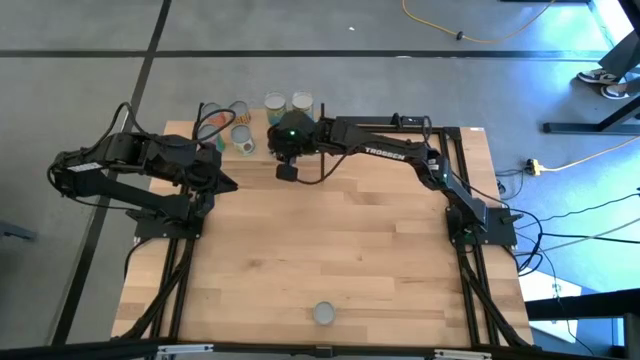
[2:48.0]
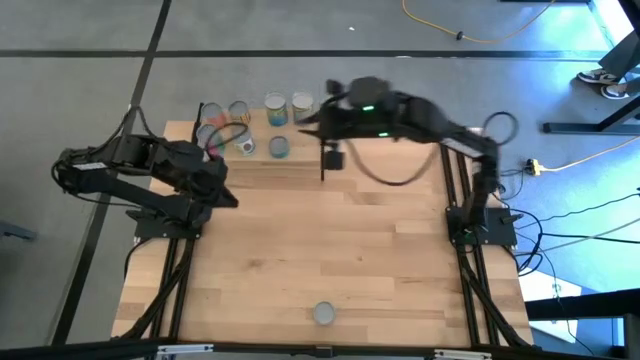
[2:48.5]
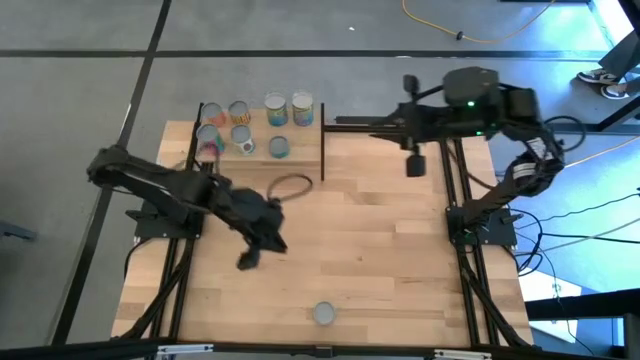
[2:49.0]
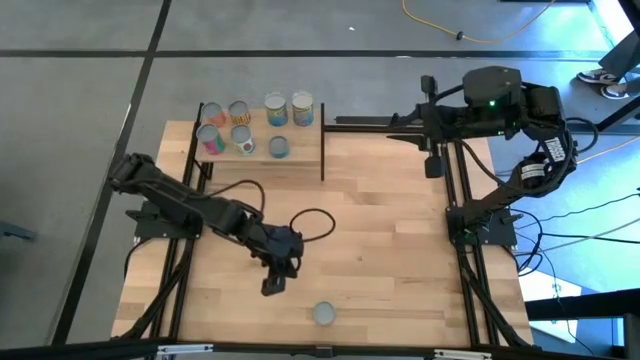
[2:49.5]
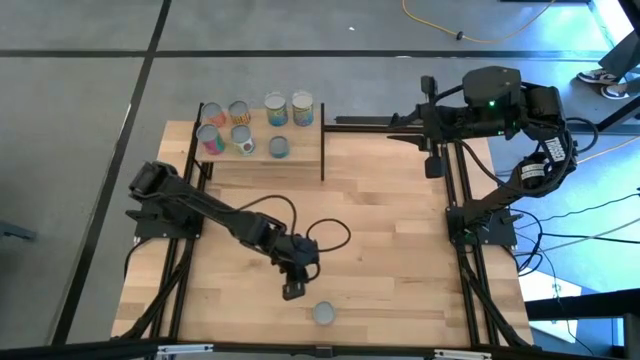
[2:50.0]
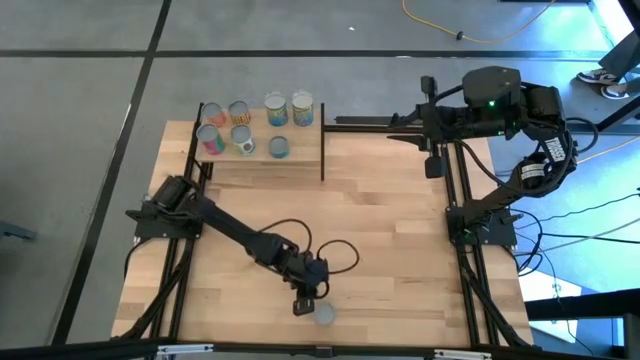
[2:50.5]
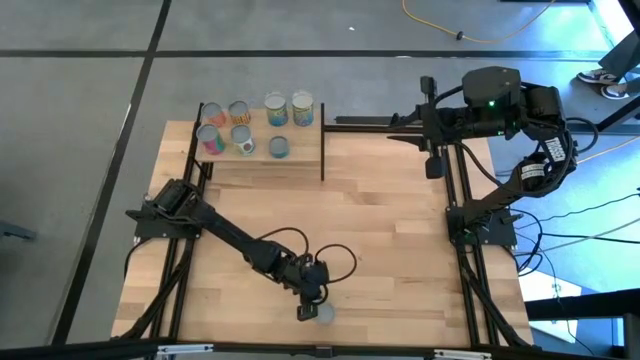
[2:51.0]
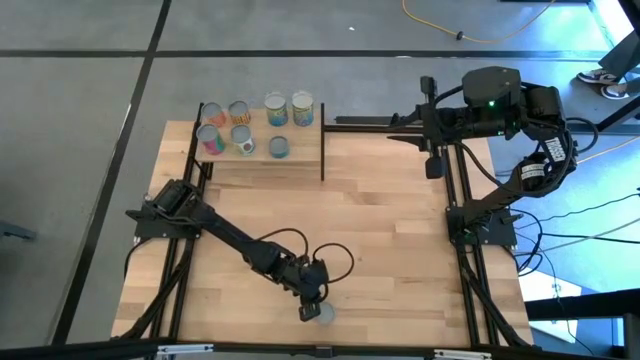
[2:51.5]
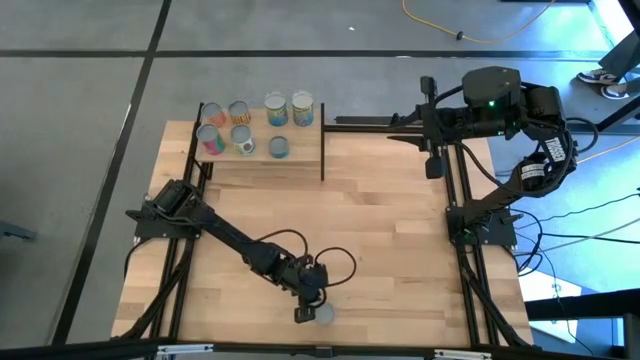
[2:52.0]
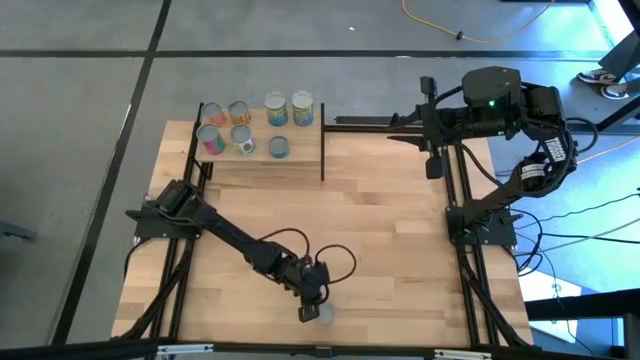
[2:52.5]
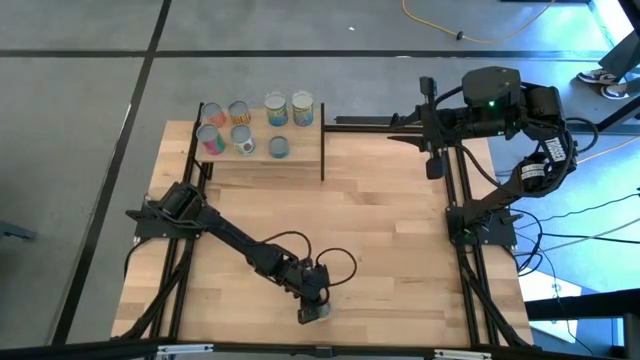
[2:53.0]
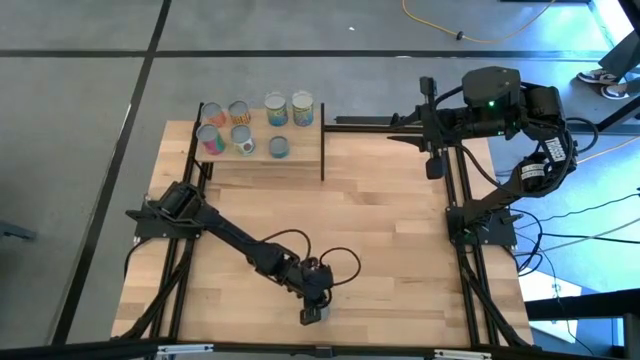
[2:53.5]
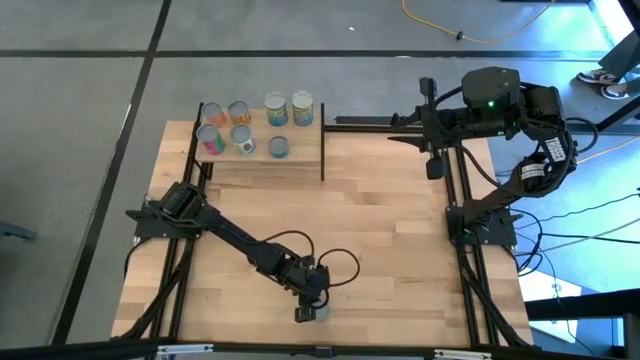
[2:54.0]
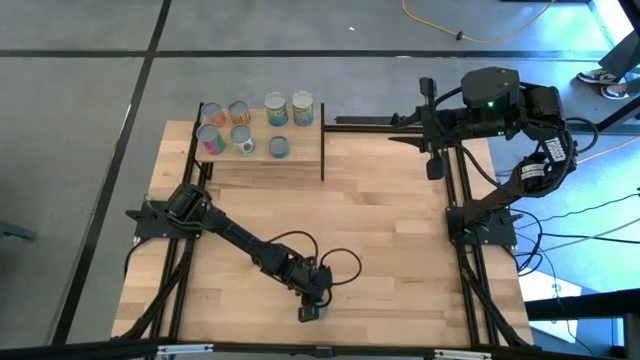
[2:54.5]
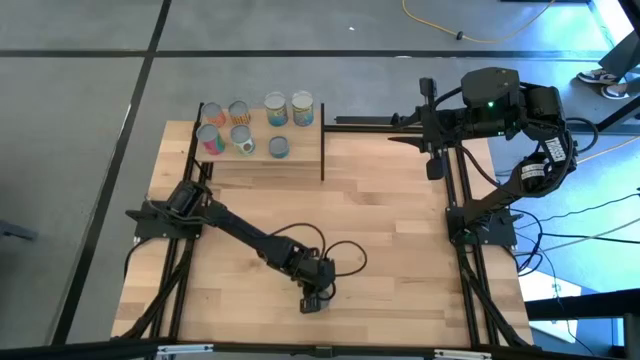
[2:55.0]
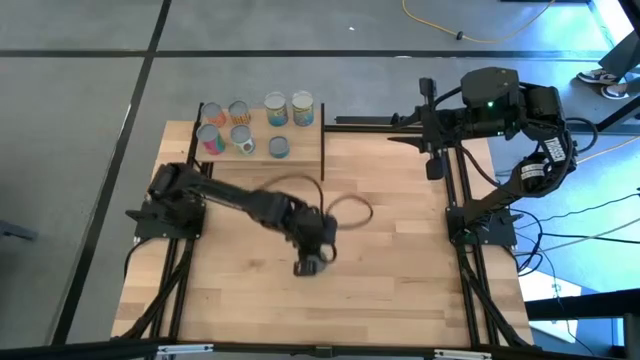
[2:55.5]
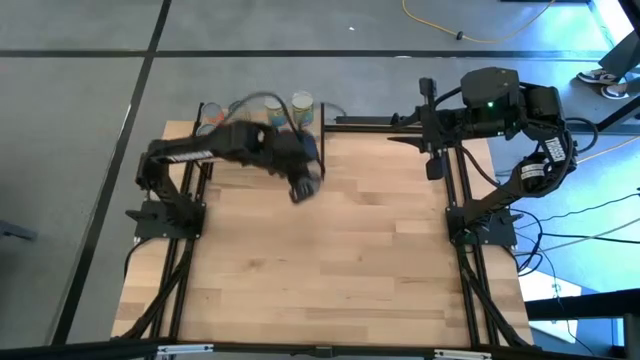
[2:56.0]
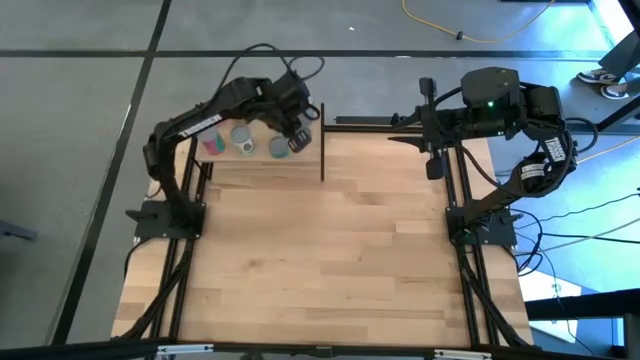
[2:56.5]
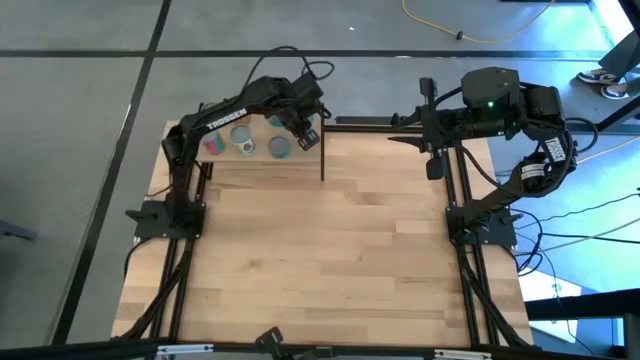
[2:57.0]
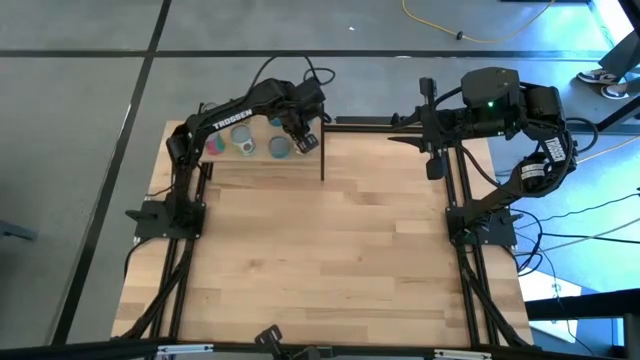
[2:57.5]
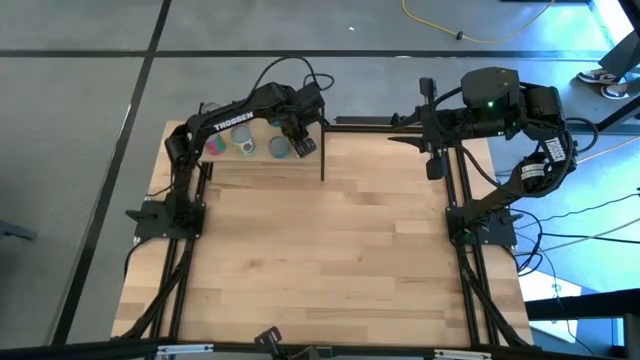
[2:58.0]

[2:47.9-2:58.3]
Task: Pick and place cans onto a shelf
Put the canned mushroom on the shelf

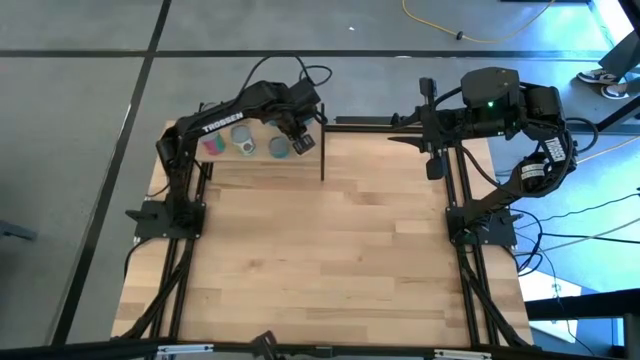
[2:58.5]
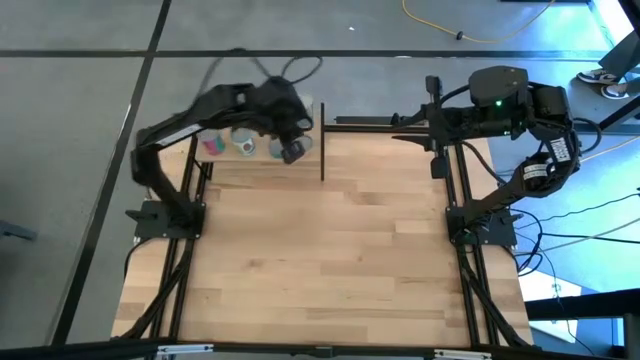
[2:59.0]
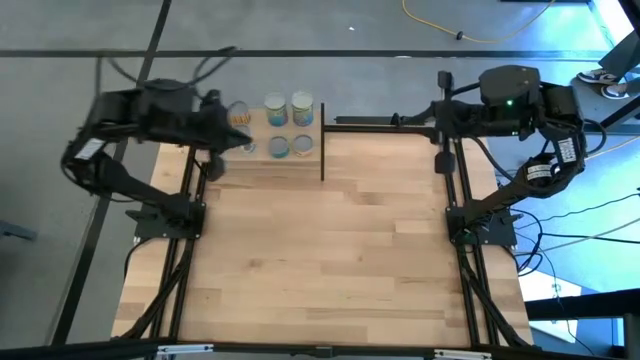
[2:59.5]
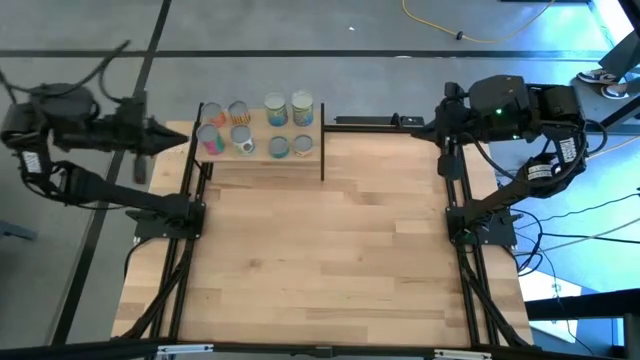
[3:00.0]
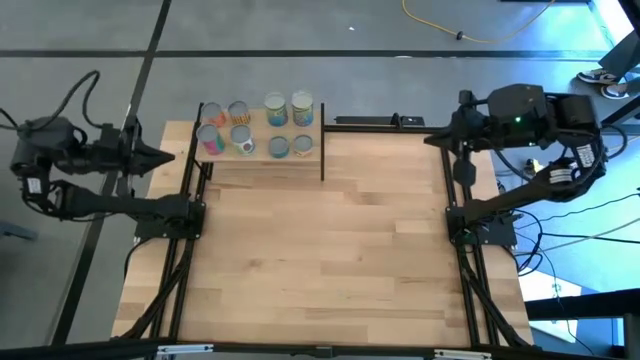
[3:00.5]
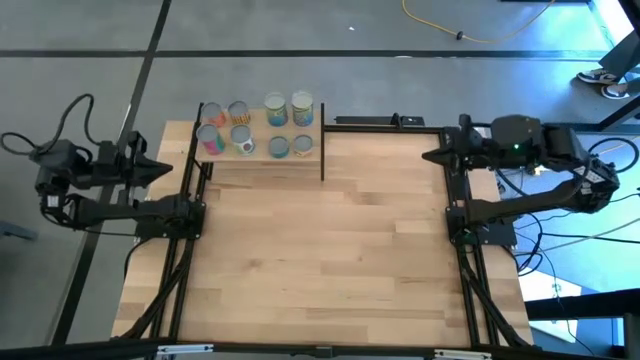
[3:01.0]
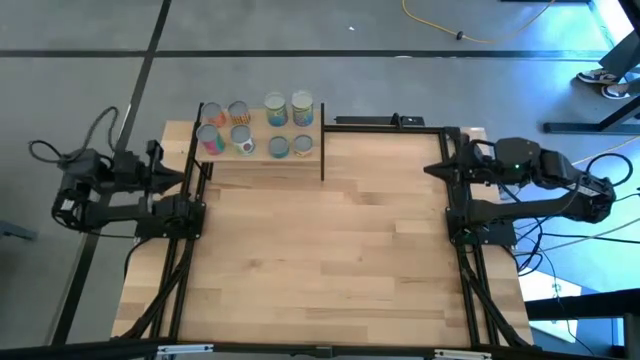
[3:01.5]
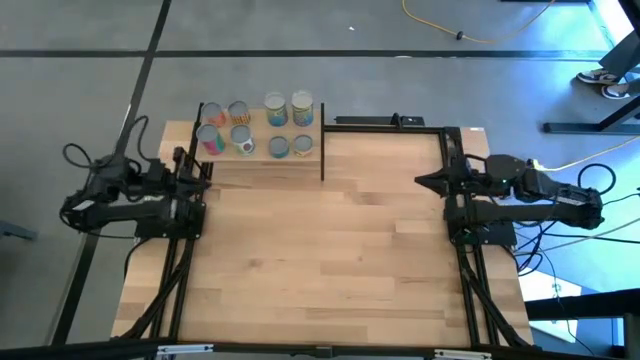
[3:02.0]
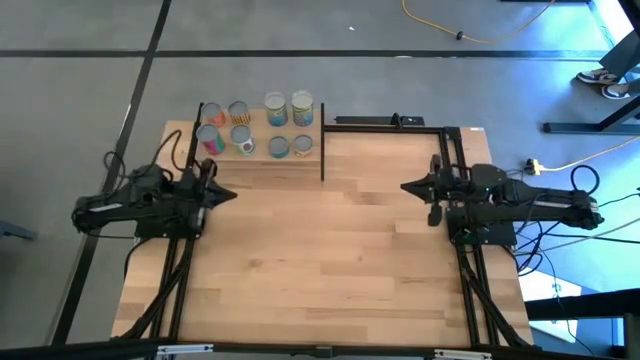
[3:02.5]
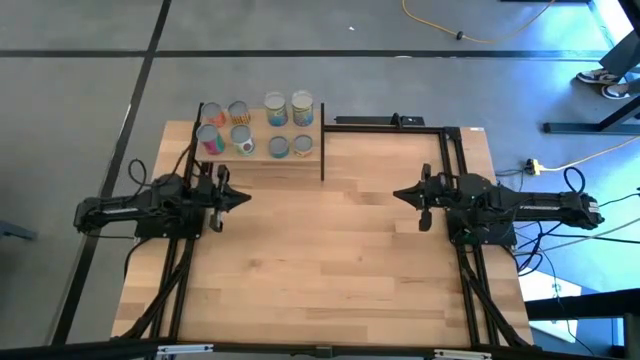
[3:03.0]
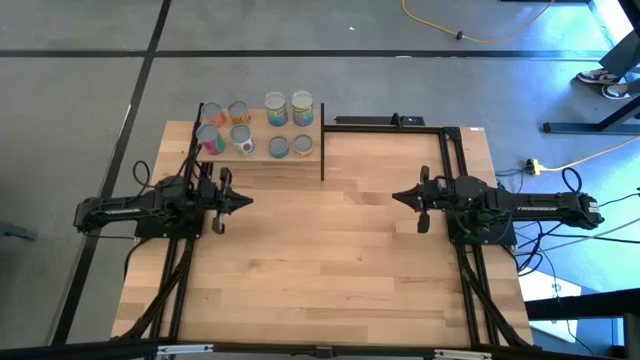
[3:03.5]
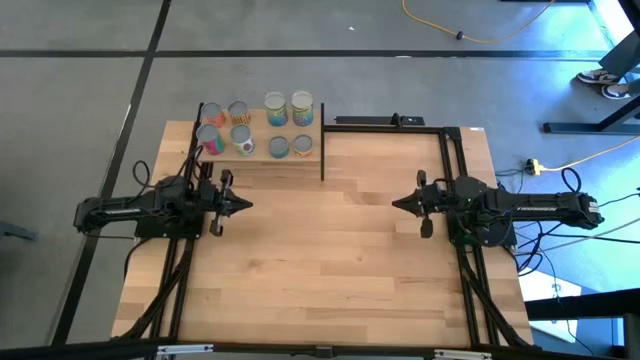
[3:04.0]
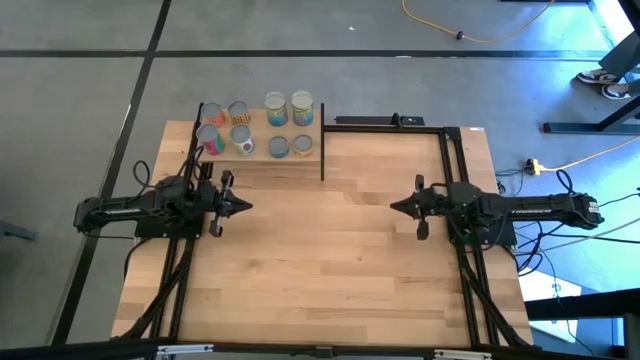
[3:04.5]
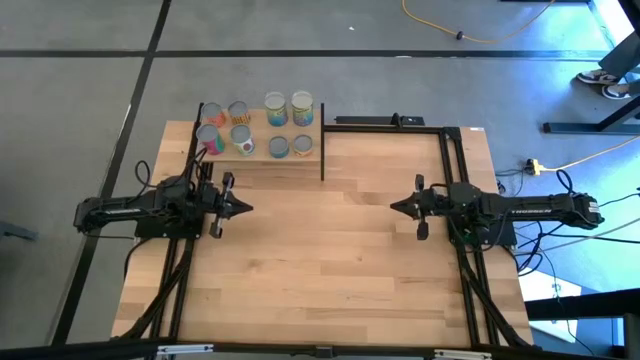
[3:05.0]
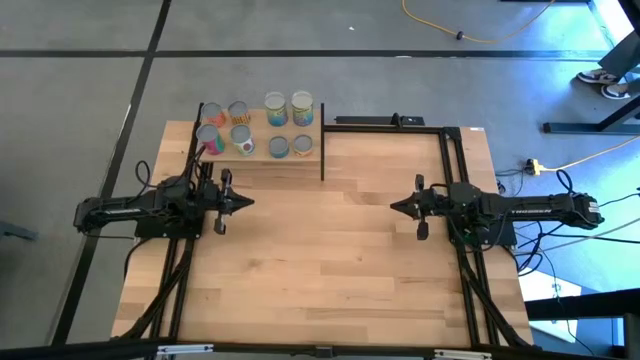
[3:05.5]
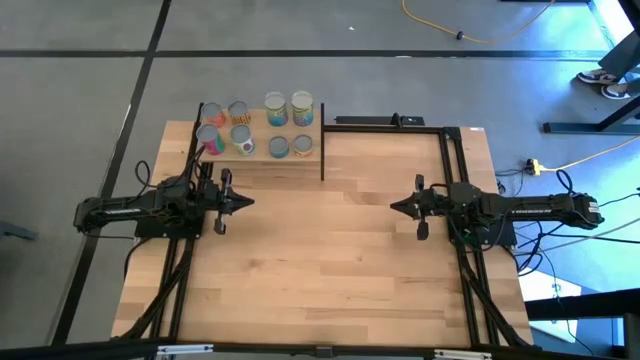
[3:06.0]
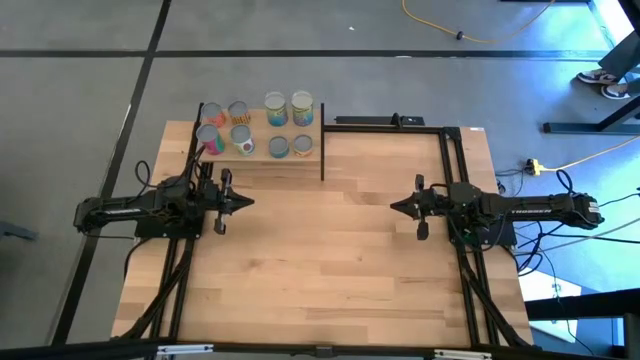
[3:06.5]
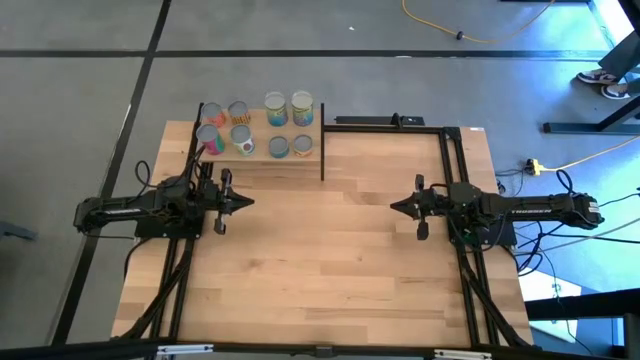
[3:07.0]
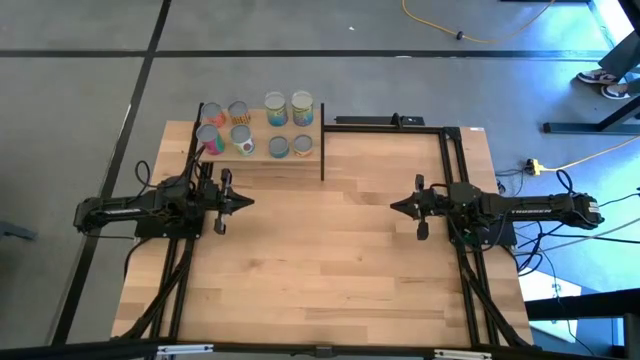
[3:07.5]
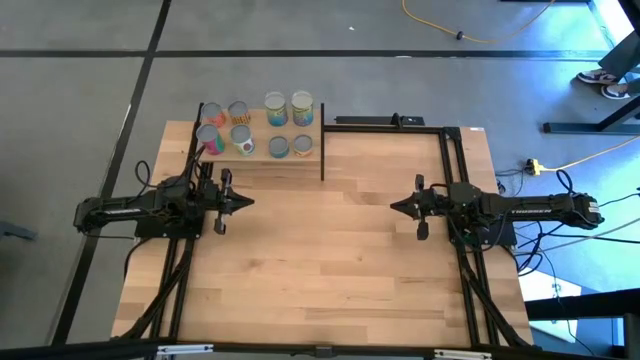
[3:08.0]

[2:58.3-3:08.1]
Return to Home Position

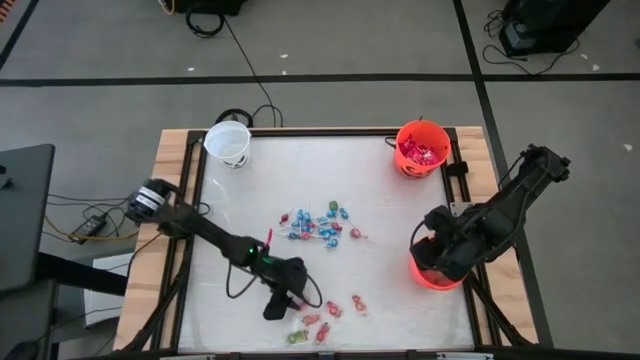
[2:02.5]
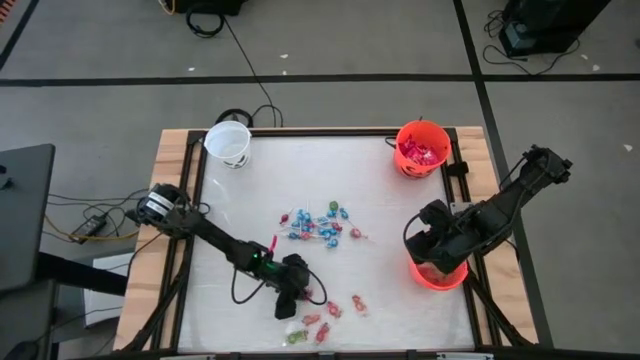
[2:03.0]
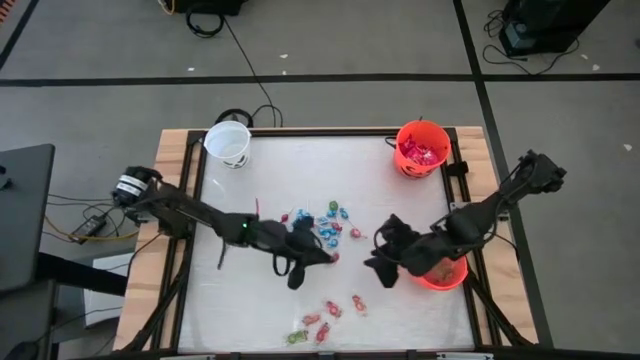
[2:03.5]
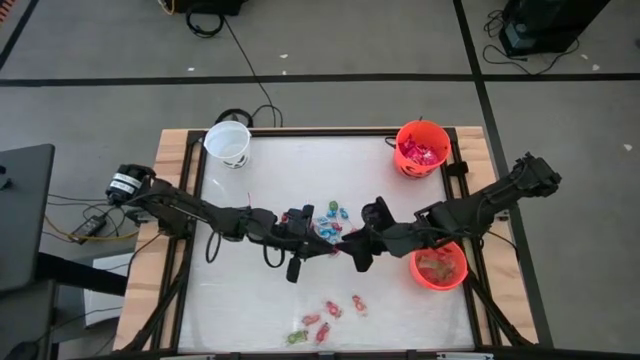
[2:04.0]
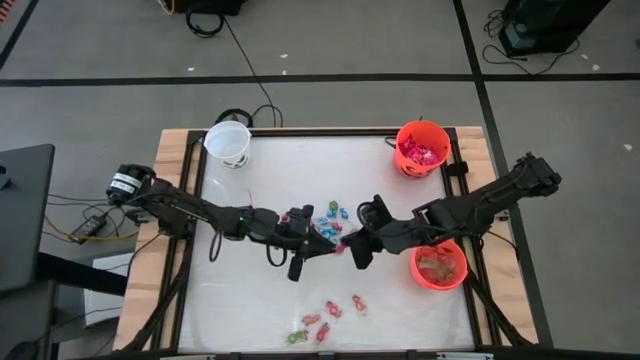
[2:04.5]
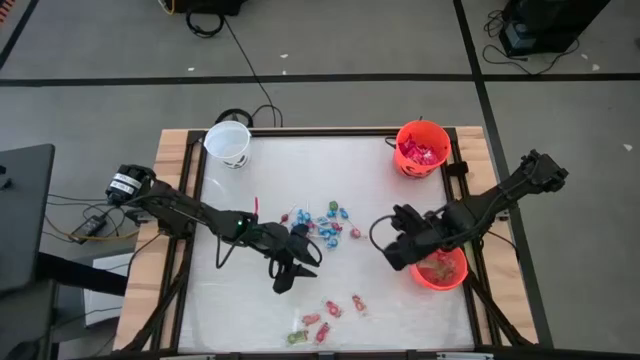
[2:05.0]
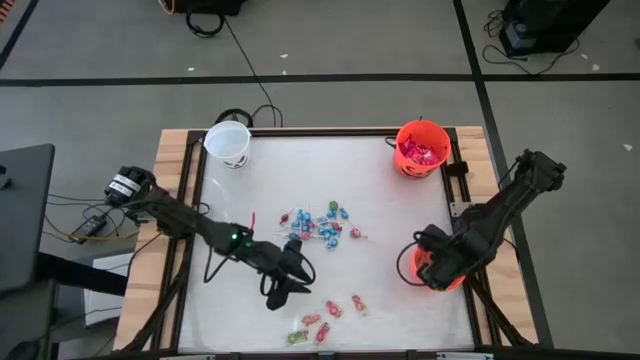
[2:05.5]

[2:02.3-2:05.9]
Task: Sort candy by brand, put in halloween buckets
Put the red gummy into the bottom orange bucket
